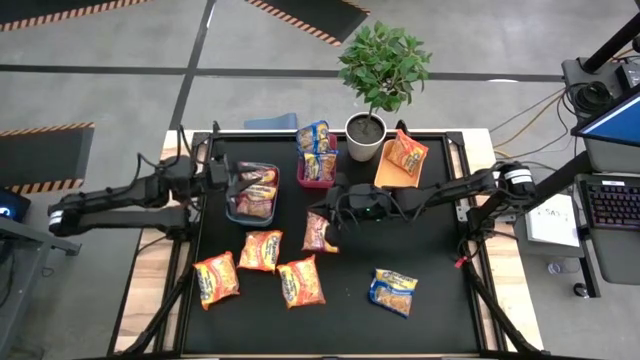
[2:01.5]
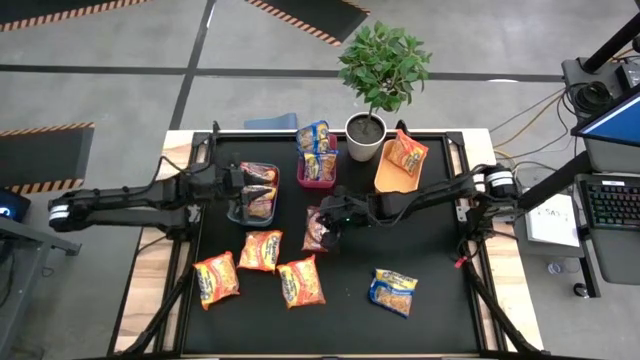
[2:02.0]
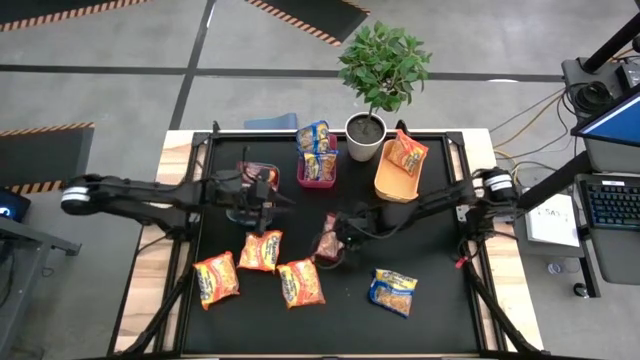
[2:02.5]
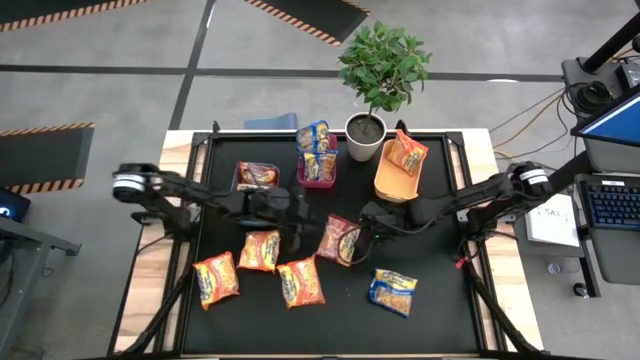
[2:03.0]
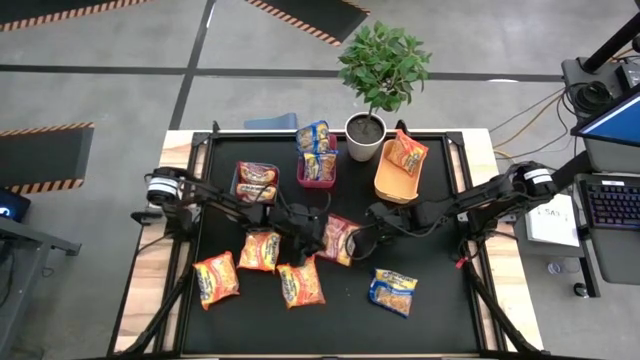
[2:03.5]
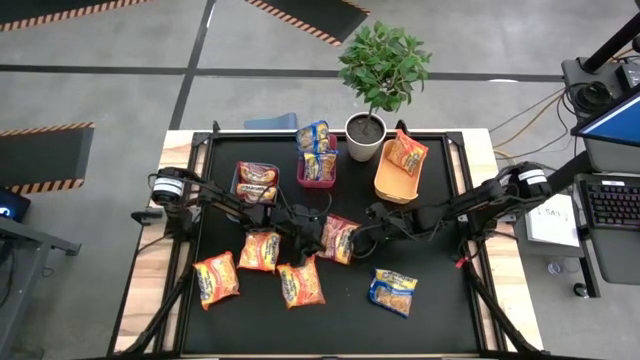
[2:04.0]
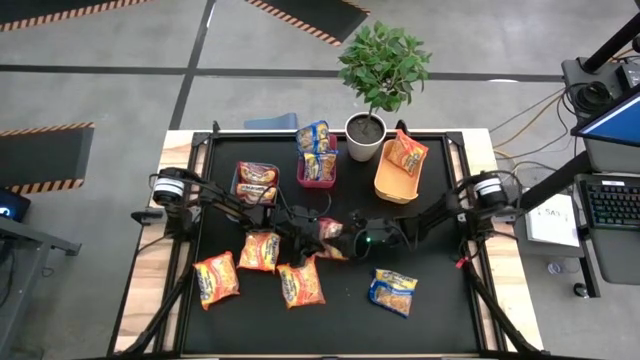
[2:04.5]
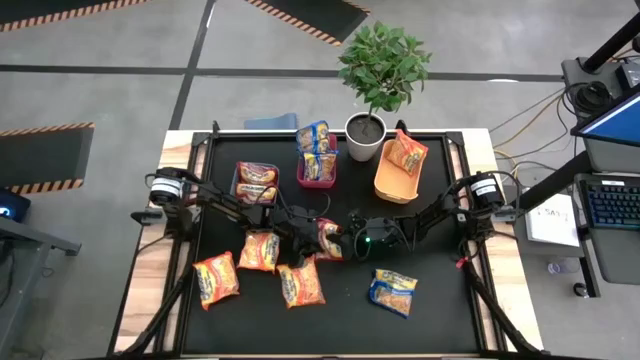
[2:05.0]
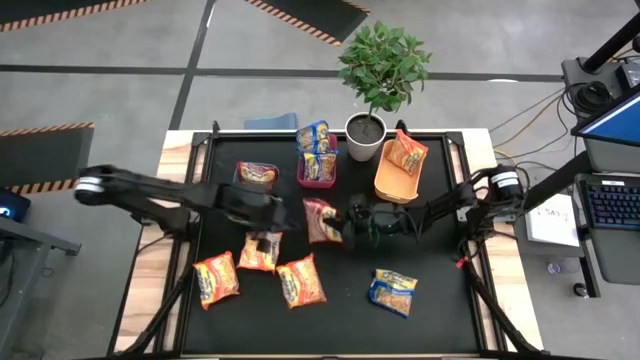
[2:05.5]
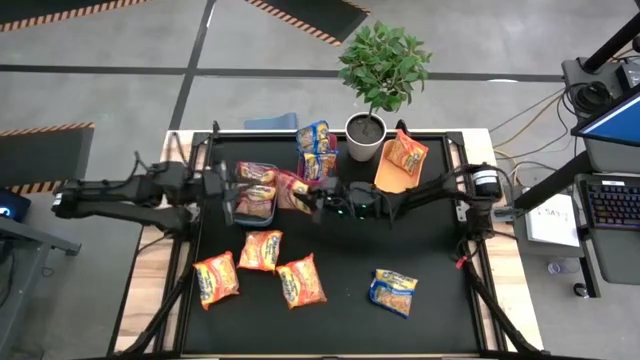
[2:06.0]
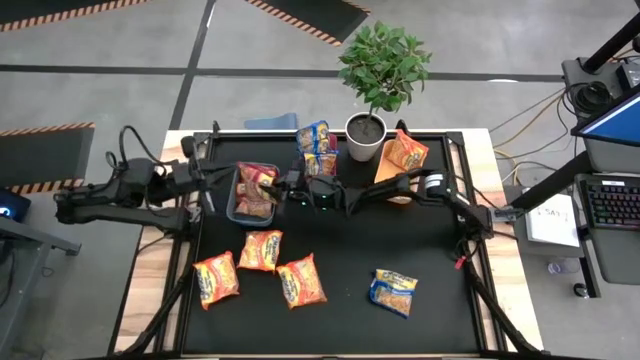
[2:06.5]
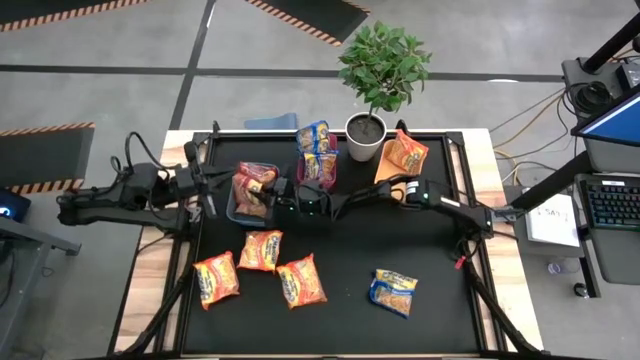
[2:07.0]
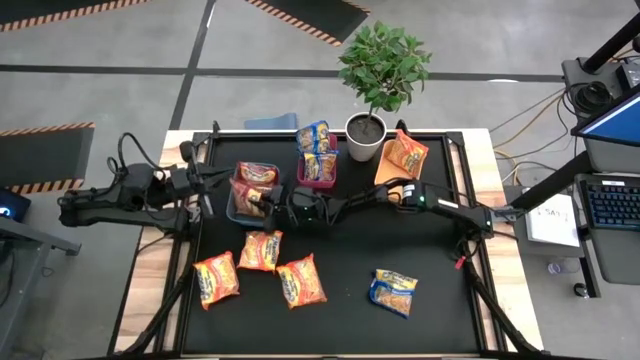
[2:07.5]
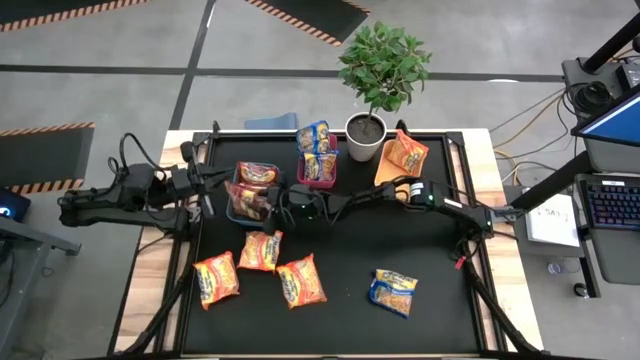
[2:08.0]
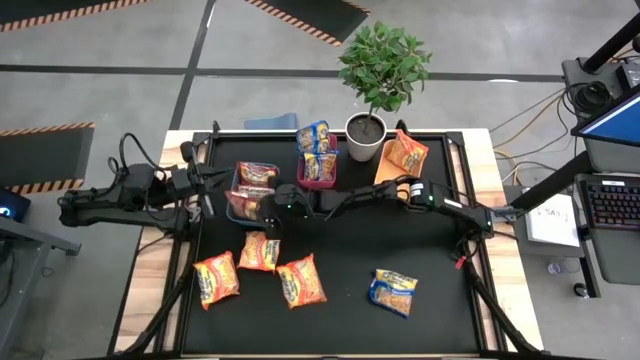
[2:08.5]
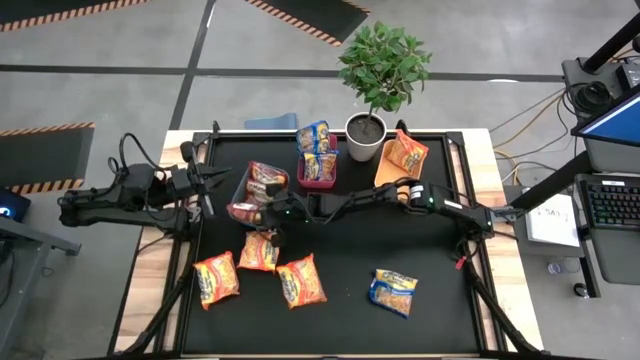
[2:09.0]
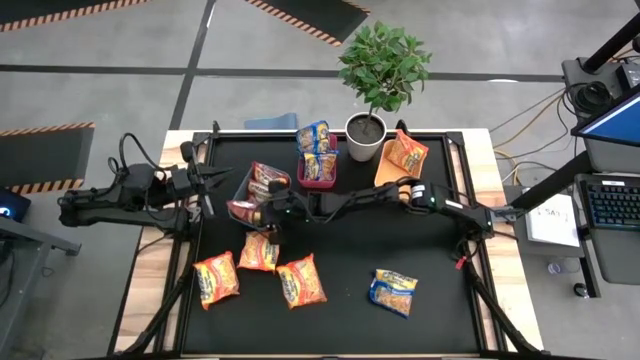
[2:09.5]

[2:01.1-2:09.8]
Task: Sort Maruchan noodles
Put the red noodle pack into the blue bin

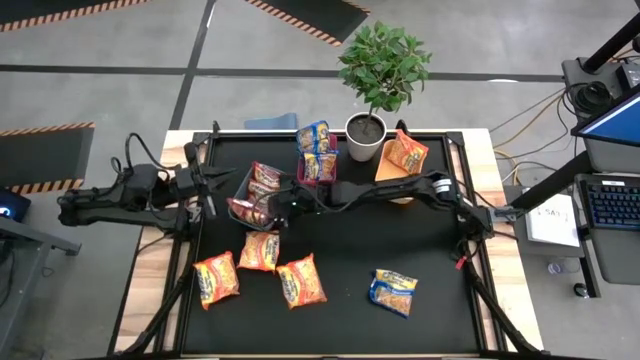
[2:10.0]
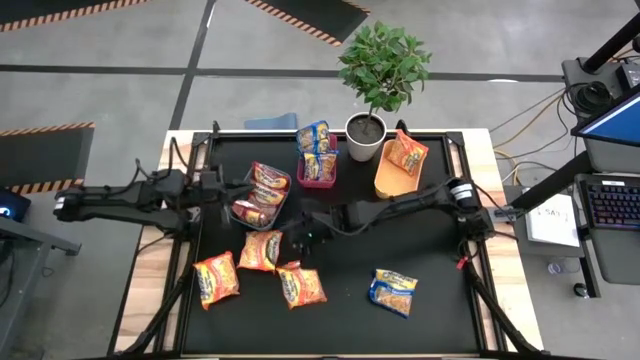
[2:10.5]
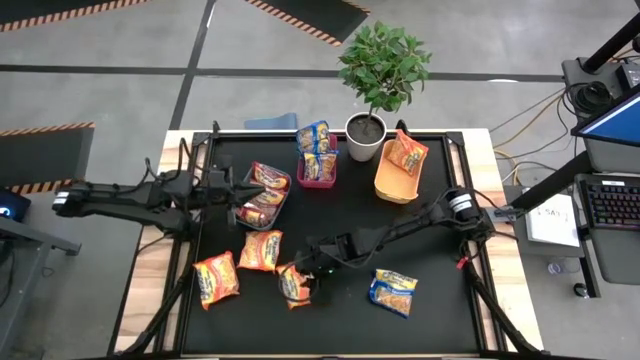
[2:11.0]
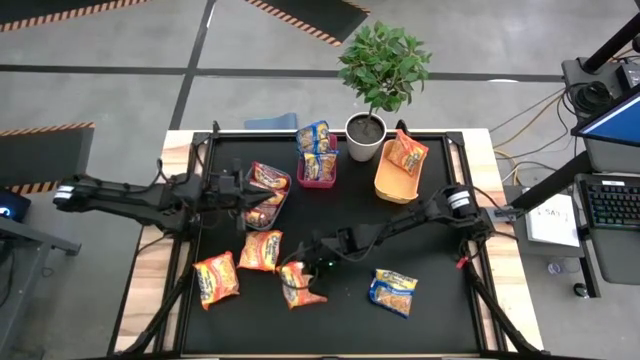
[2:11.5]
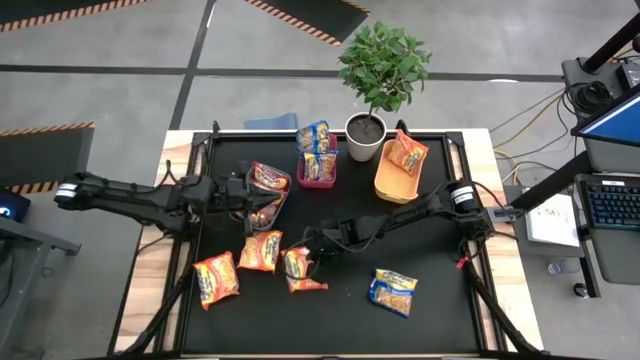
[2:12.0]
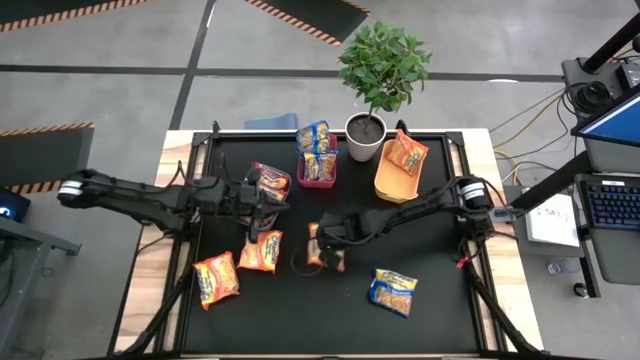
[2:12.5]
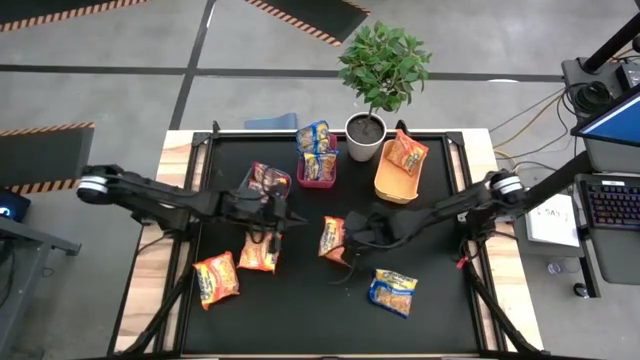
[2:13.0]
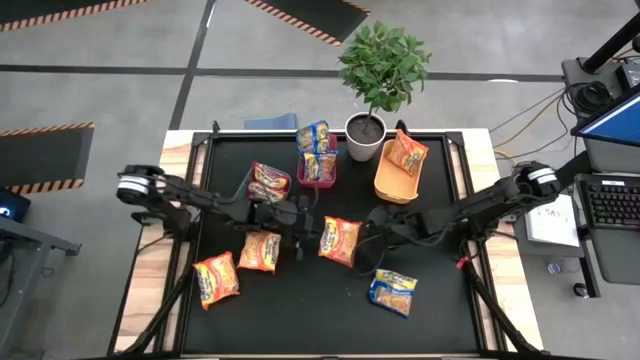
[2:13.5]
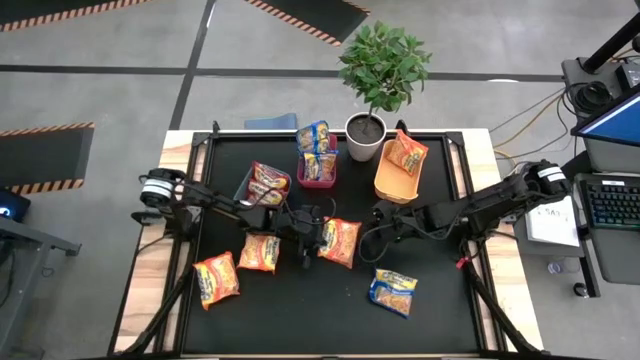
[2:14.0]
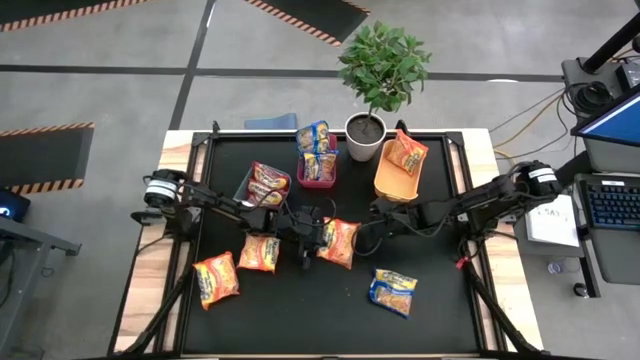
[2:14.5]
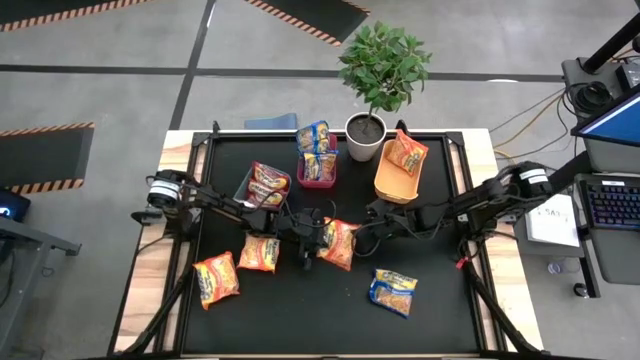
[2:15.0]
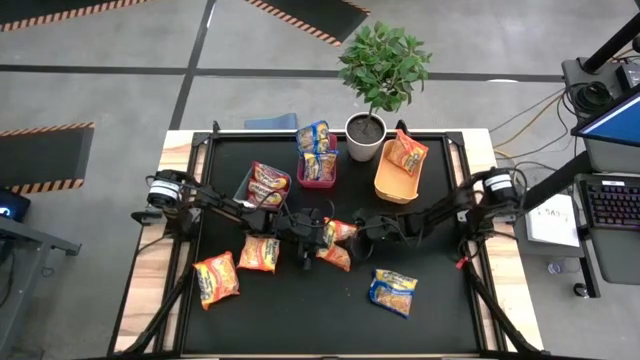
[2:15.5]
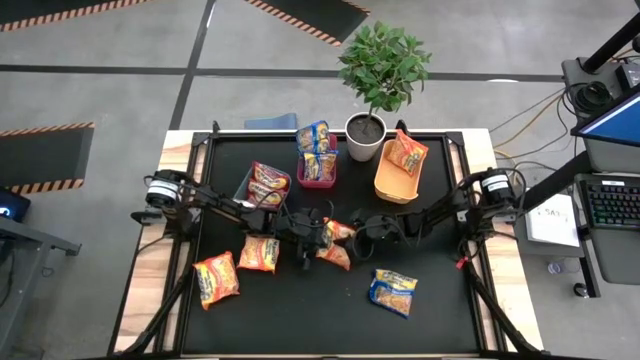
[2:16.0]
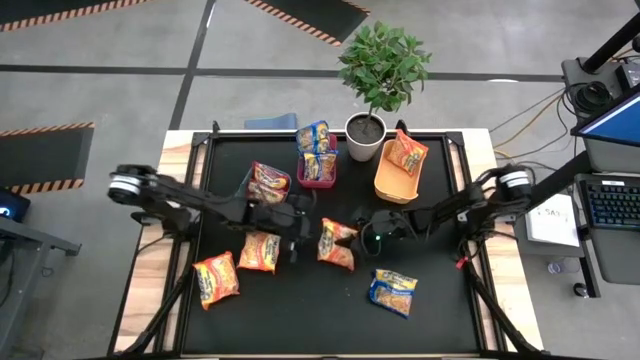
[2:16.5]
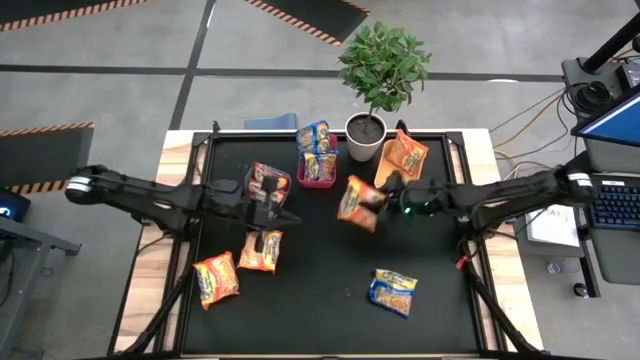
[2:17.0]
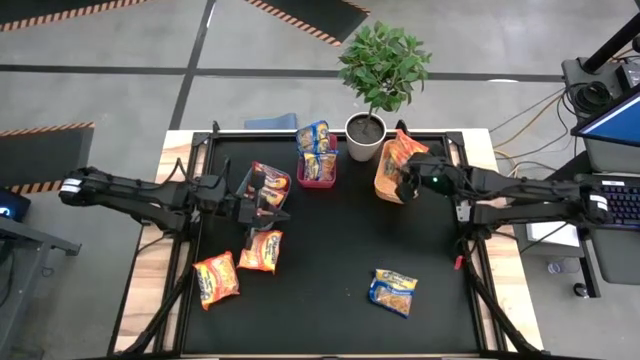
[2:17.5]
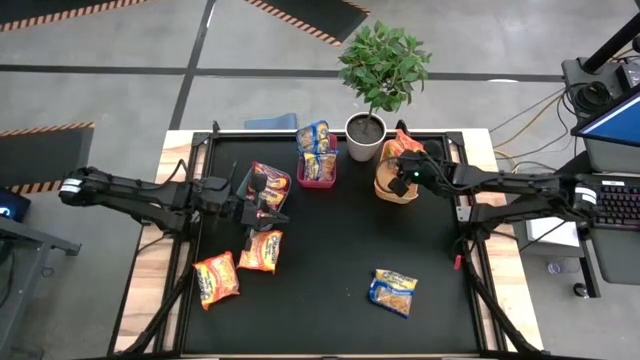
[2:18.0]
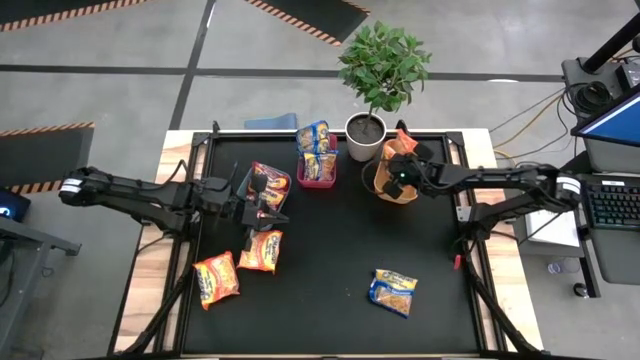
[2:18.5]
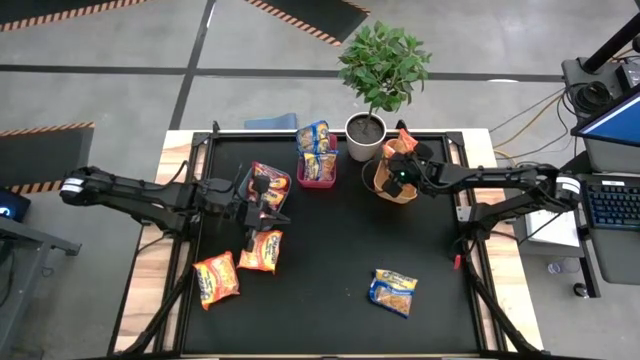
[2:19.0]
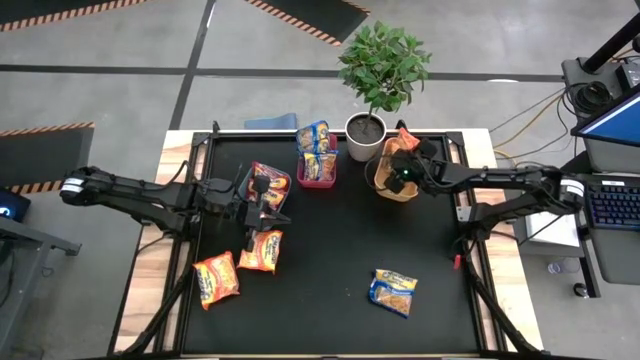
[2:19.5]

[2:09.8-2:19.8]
Put the right orange noodle pack into the yellow bin

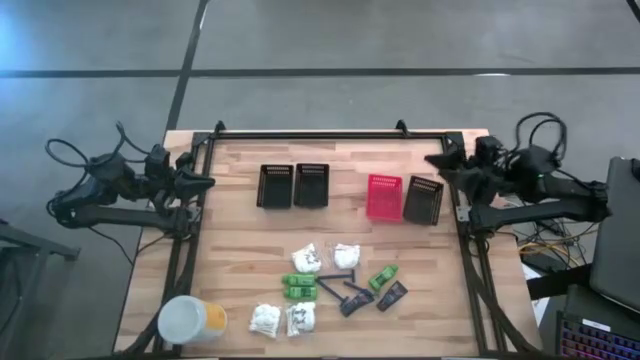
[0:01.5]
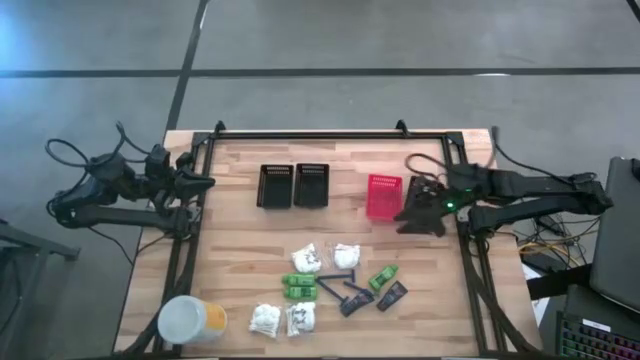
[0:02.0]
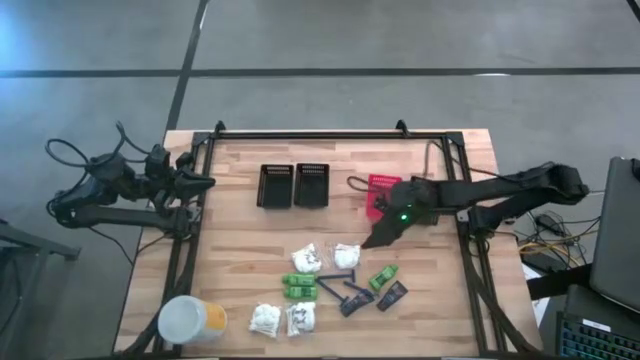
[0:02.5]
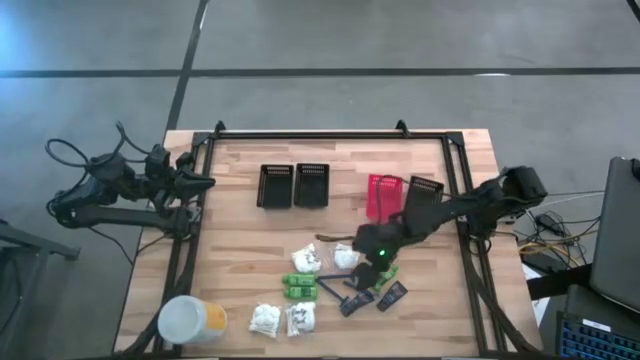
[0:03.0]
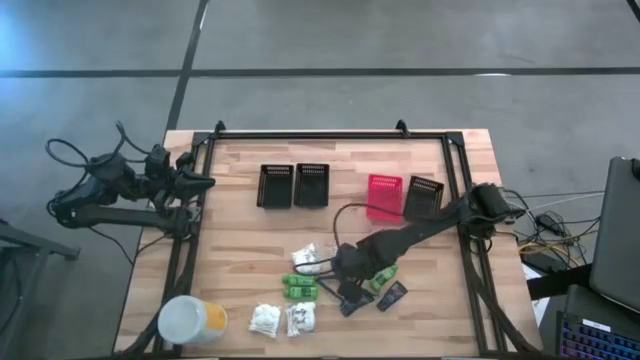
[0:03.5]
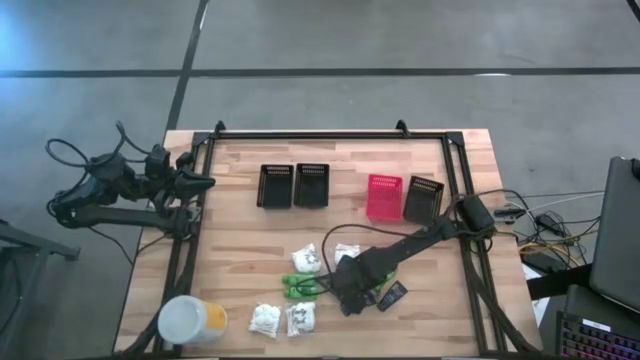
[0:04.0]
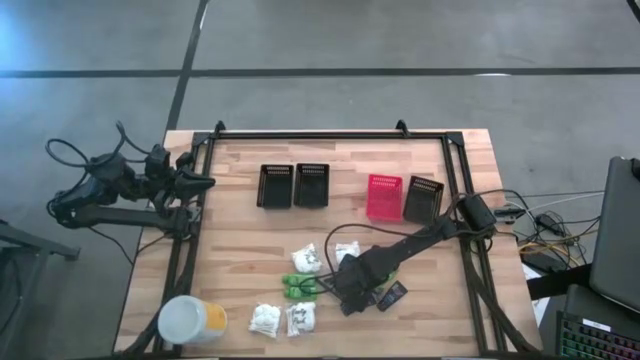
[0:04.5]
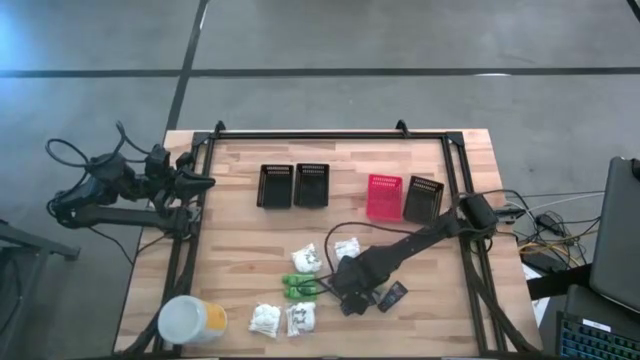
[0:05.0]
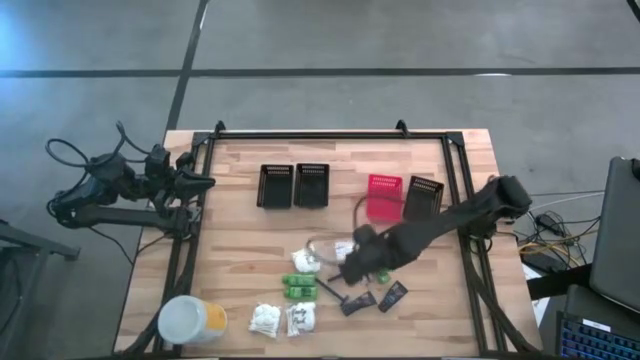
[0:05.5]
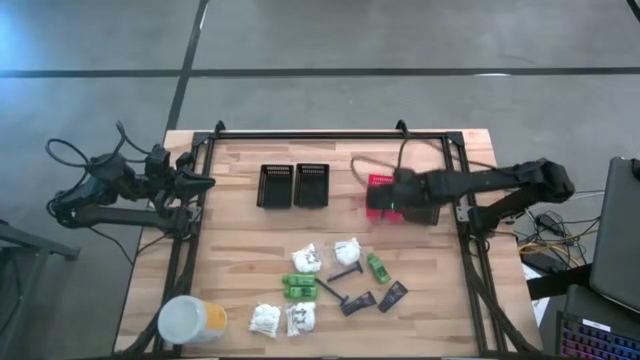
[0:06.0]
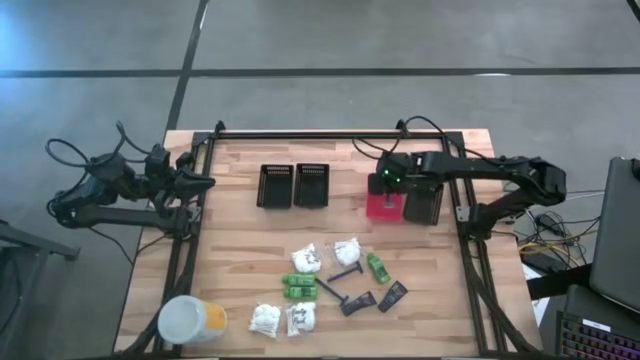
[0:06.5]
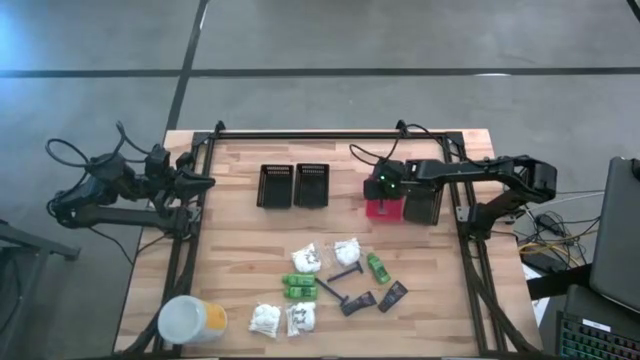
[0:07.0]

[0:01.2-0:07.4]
Task: Pick & Place Travel size toiletries
Put the blue razor into the red bin
